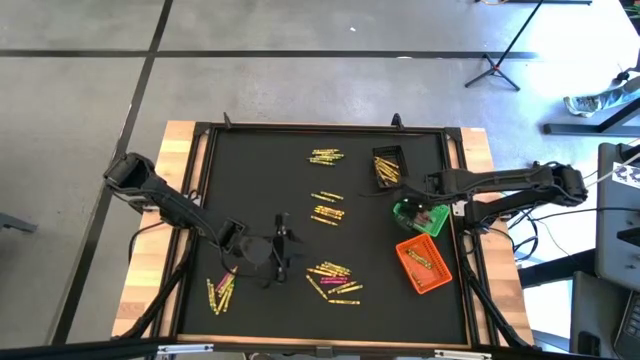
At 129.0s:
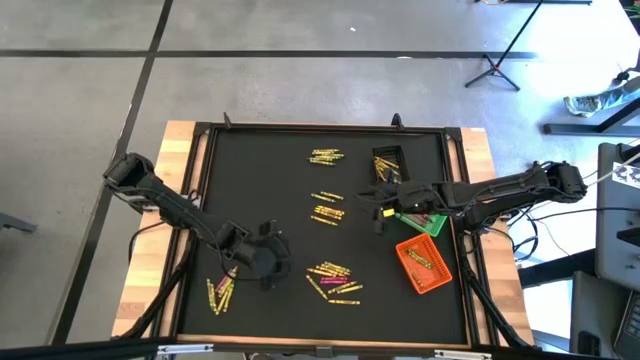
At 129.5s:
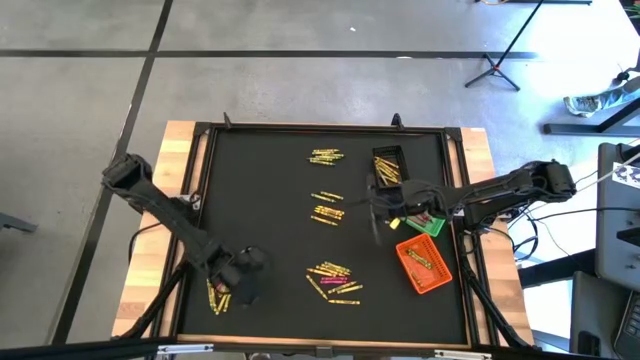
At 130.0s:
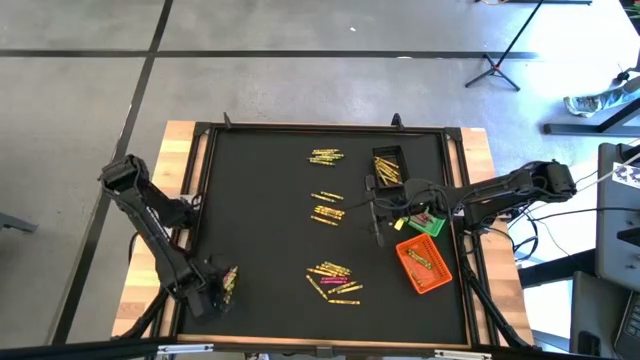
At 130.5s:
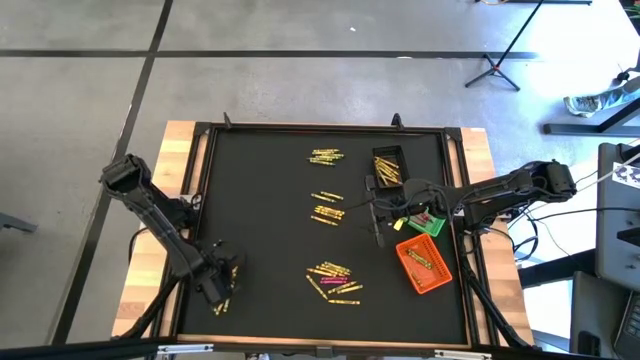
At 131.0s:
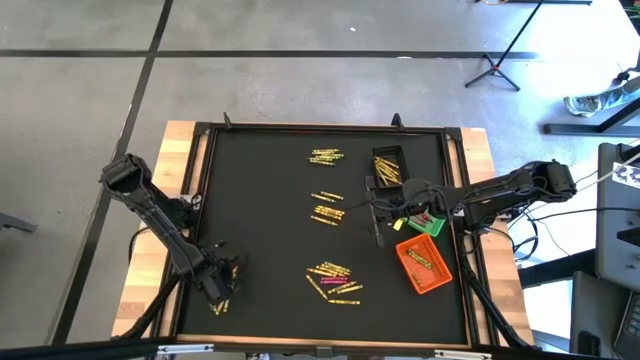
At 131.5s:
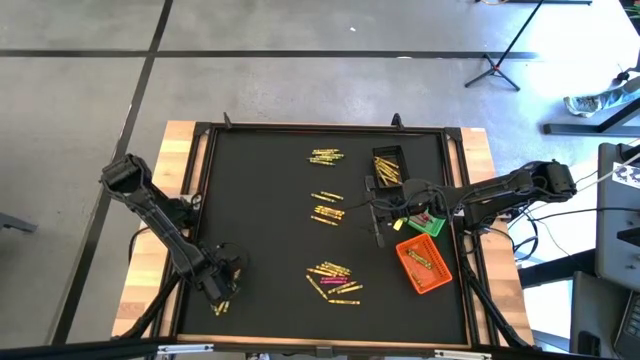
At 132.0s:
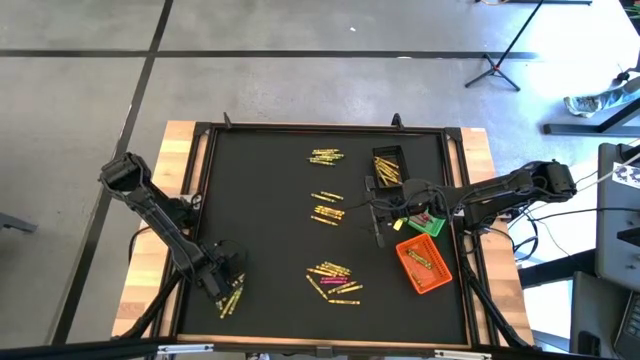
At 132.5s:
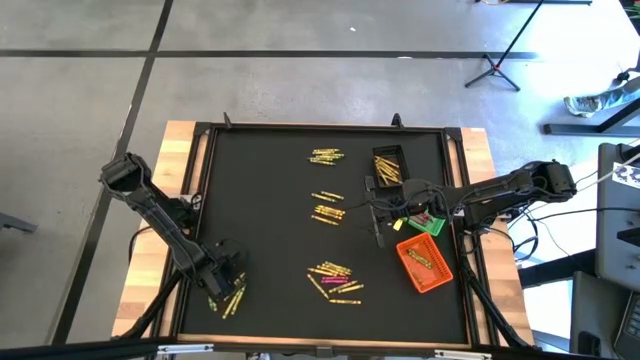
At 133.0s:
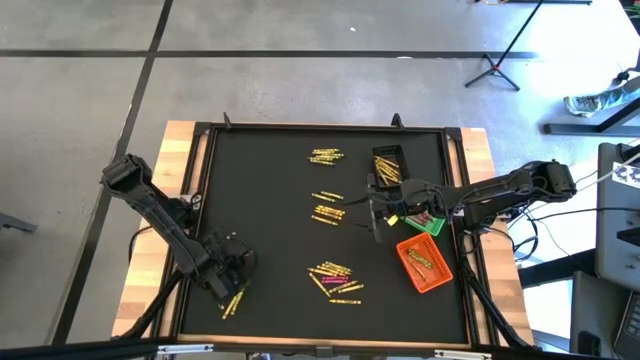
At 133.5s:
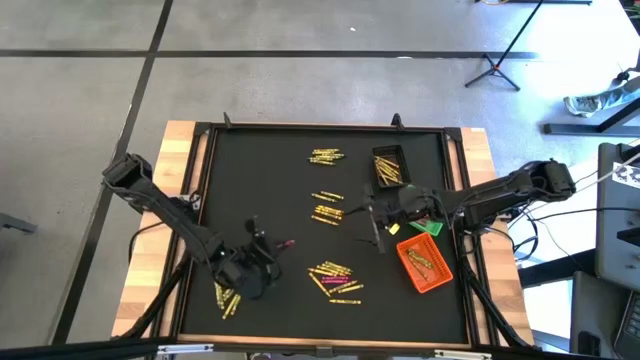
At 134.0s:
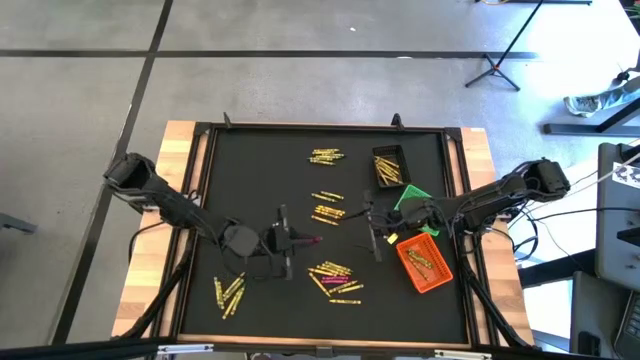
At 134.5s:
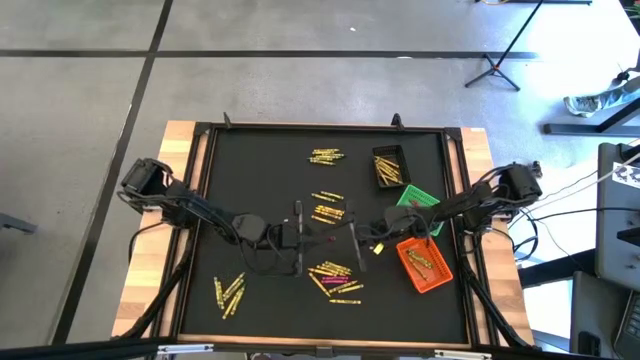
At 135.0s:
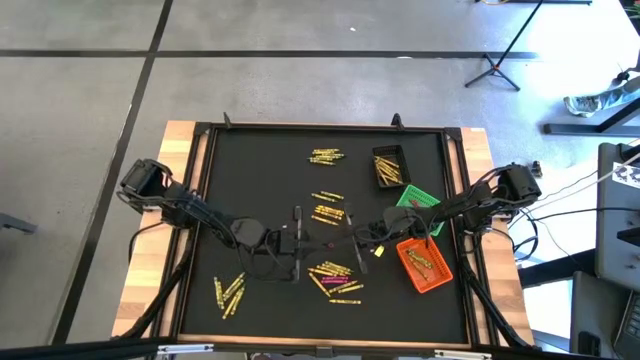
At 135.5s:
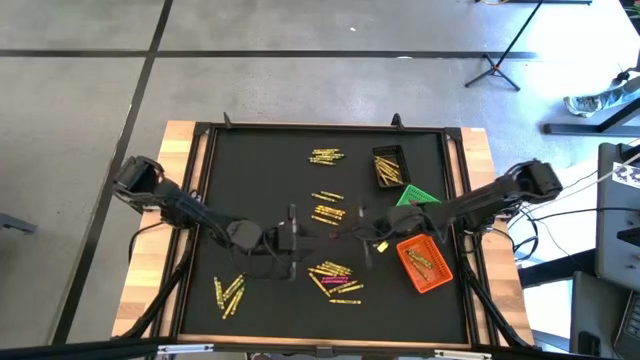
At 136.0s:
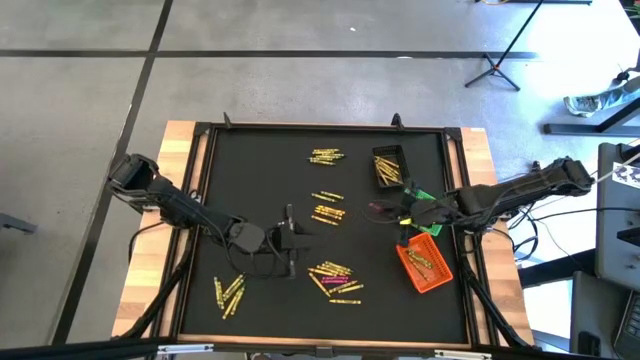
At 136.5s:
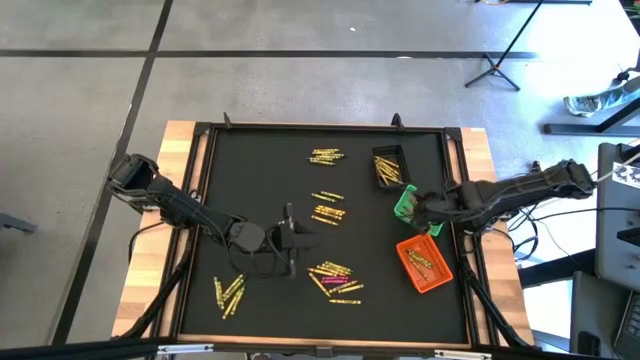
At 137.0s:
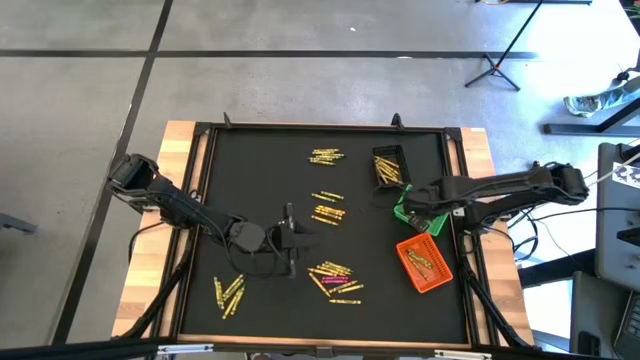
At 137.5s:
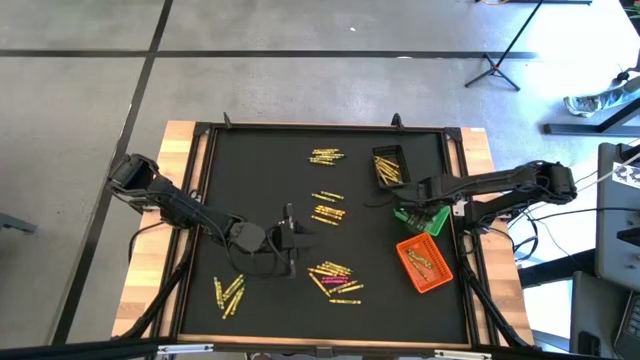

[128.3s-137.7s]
Task: Sort crayons
Put the red crayon into the green basket

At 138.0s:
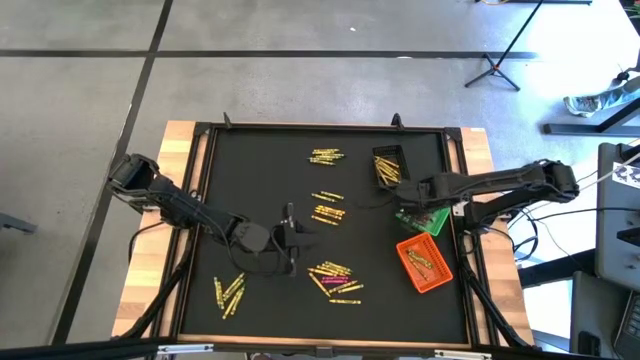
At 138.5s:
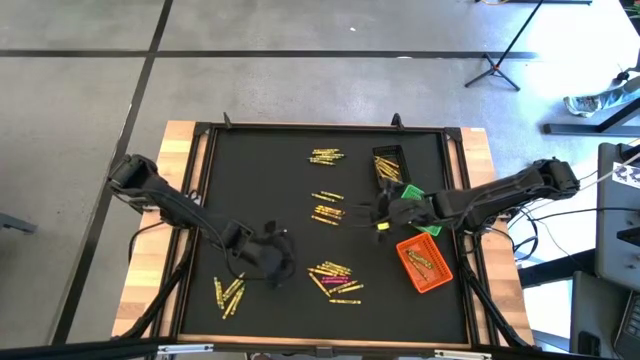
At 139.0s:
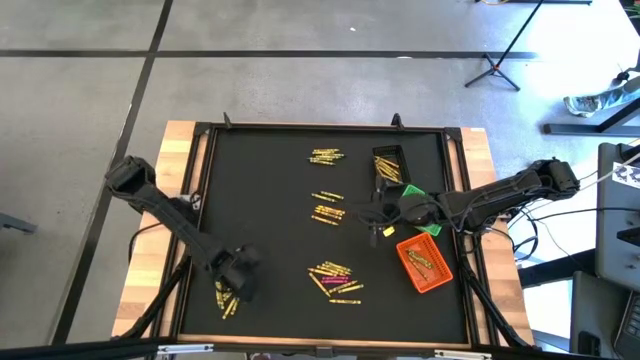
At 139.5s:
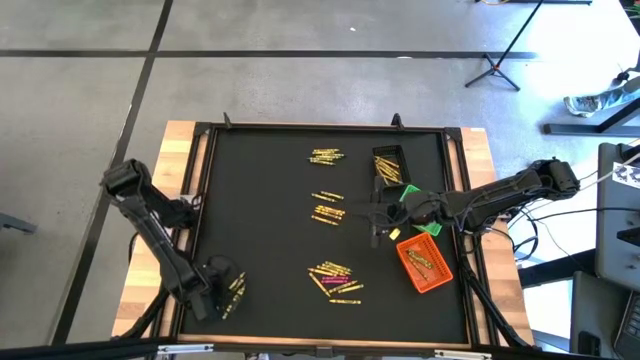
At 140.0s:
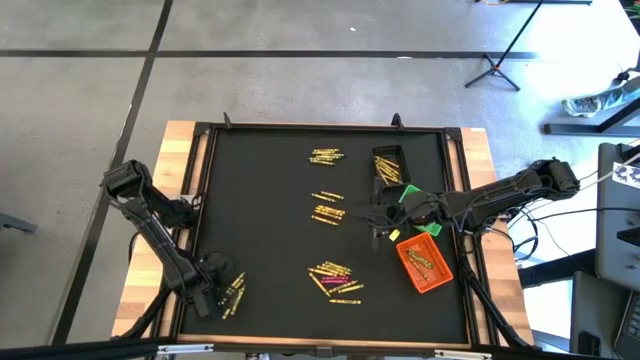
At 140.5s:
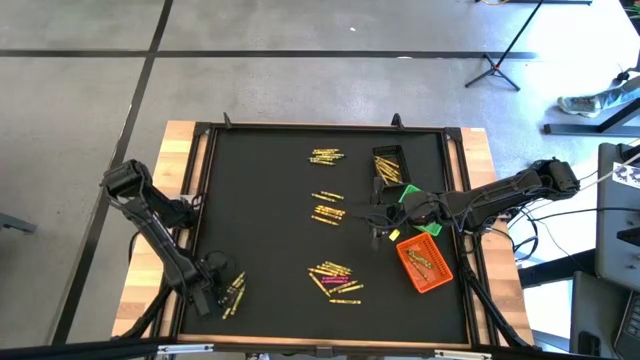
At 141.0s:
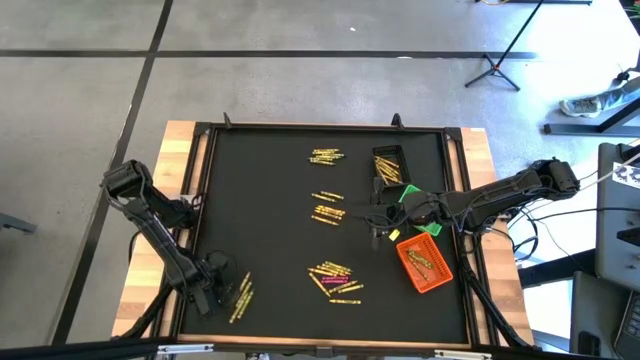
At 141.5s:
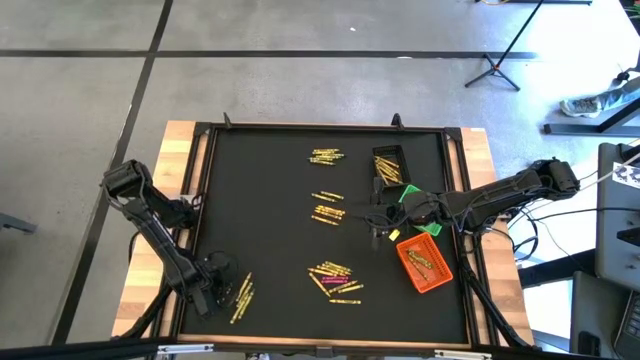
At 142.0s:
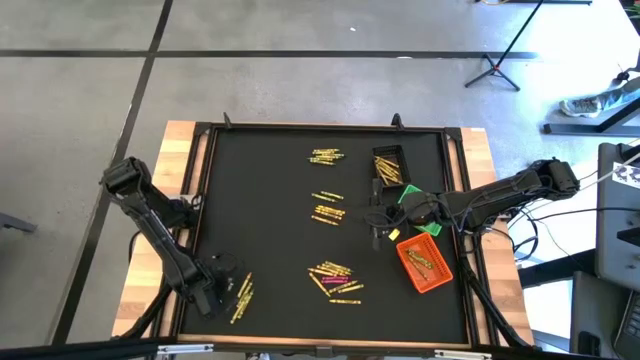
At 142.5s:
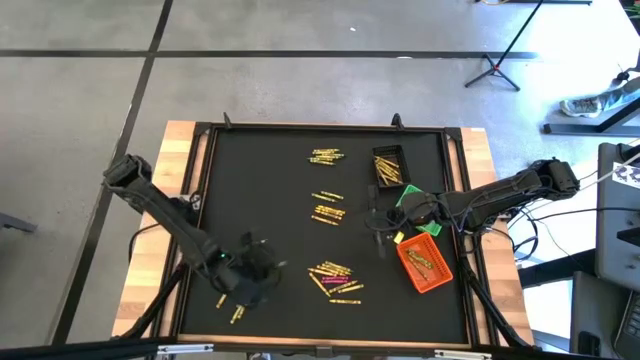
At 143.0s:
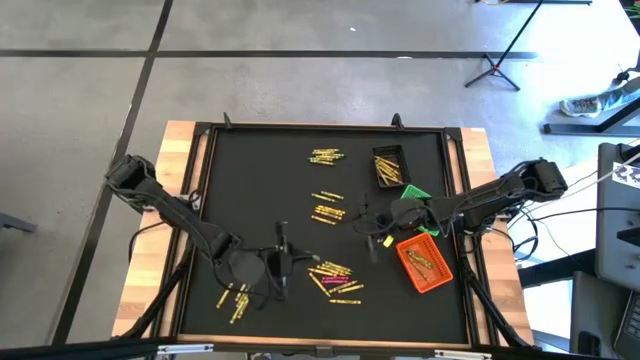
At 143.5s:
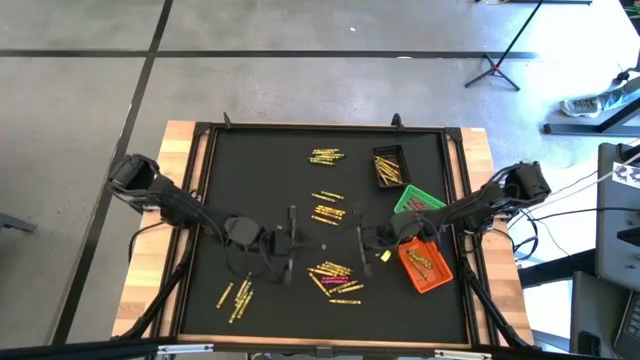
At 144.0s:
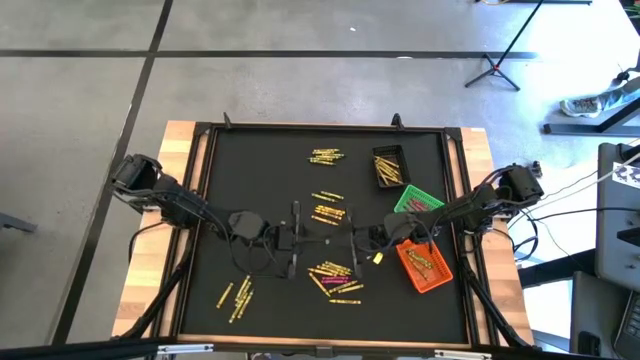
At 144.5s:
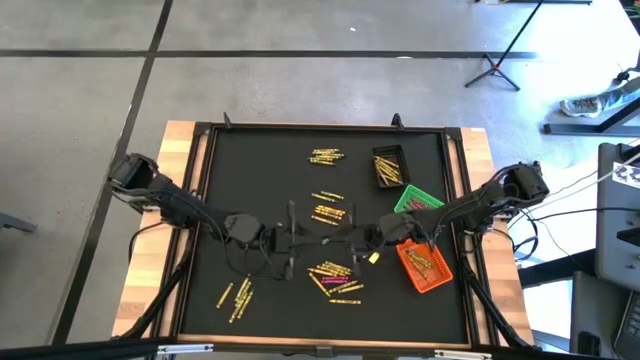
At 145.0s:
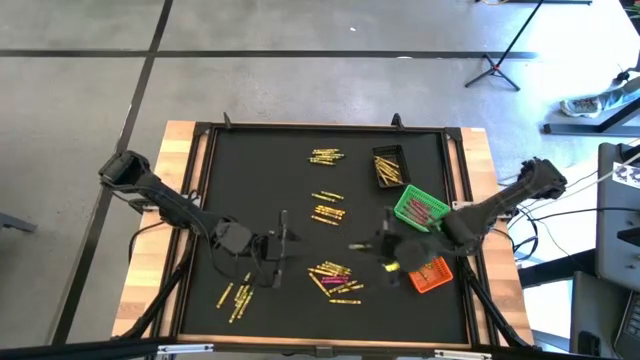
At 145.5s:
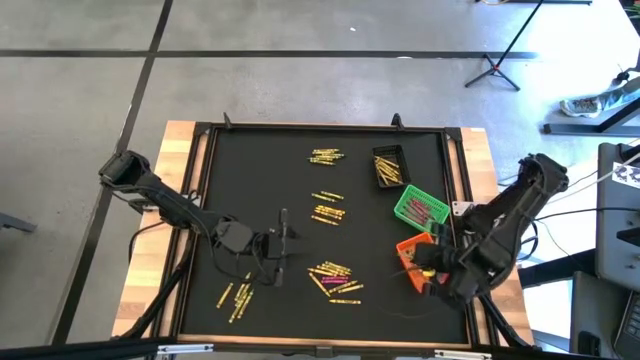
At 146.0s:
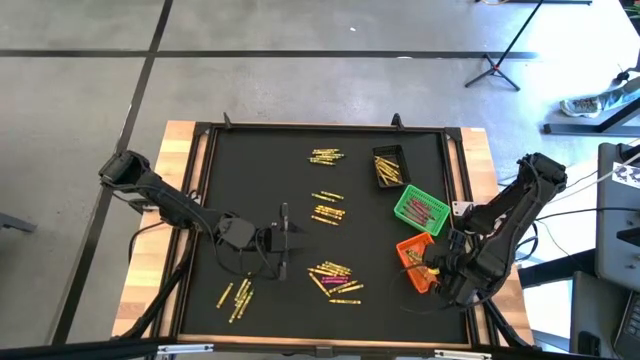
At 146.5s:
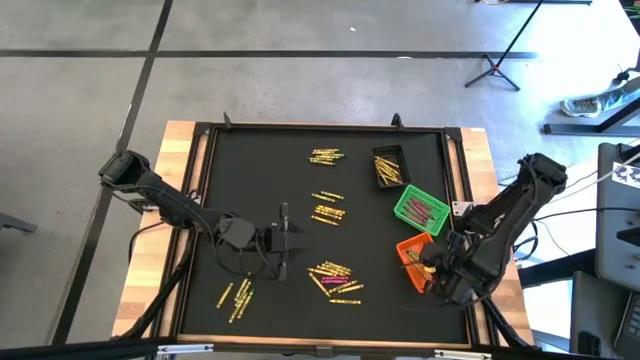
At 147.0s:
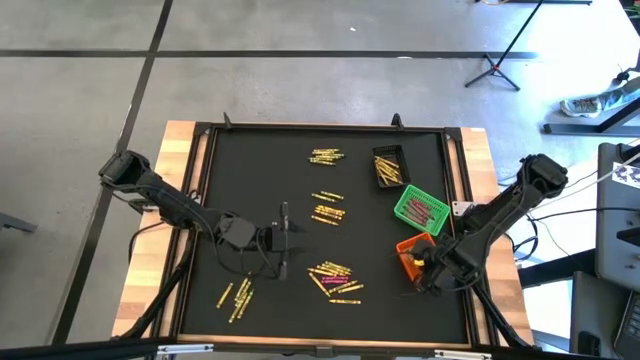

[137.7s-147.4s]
Put the green crayon into the orange basket

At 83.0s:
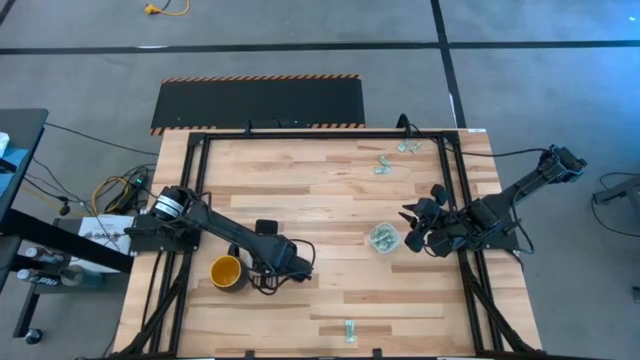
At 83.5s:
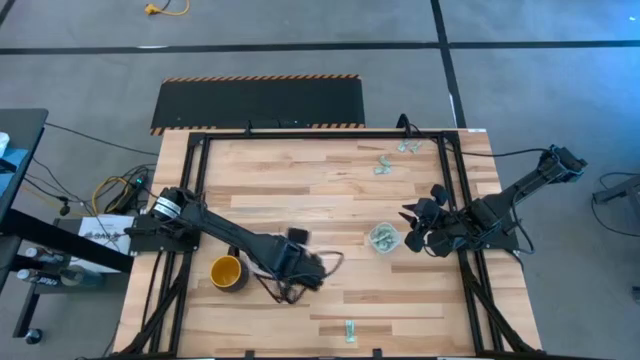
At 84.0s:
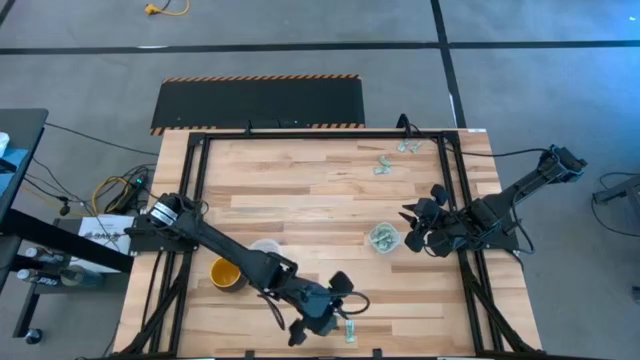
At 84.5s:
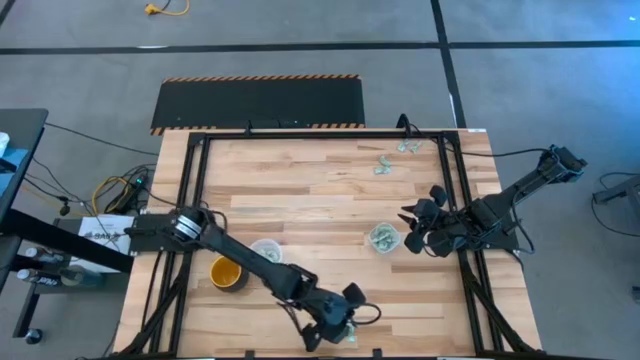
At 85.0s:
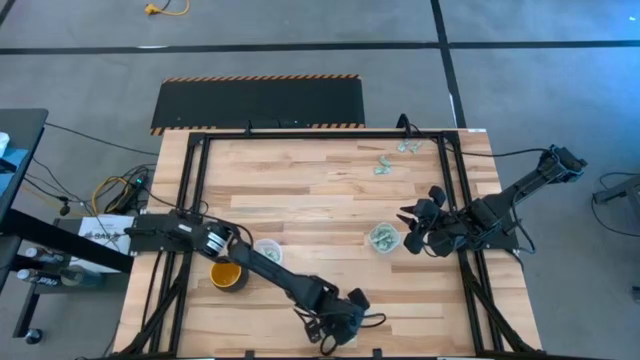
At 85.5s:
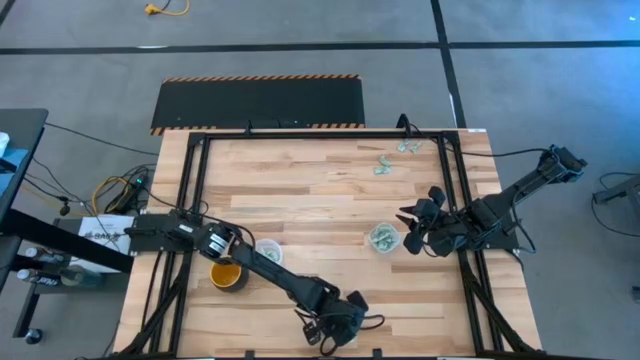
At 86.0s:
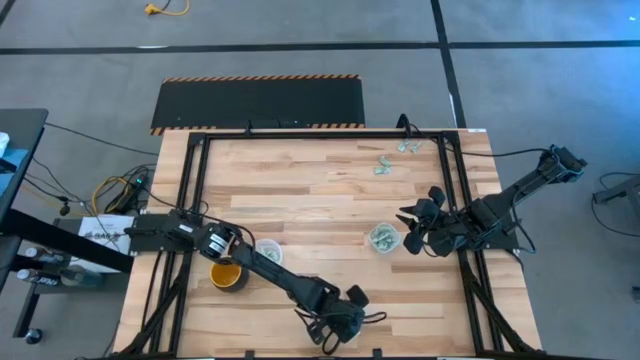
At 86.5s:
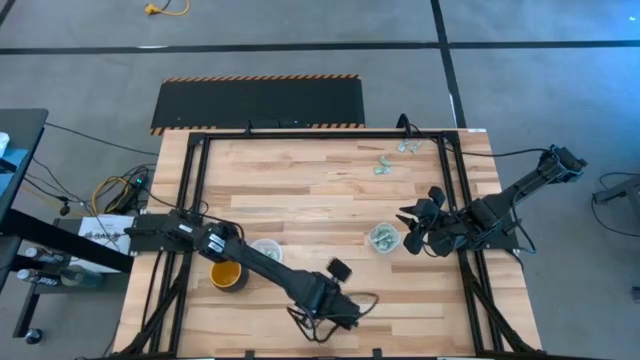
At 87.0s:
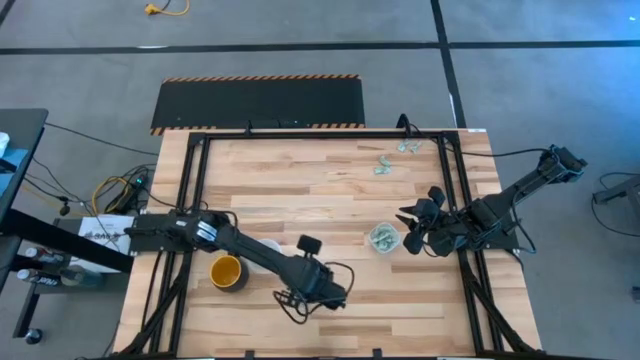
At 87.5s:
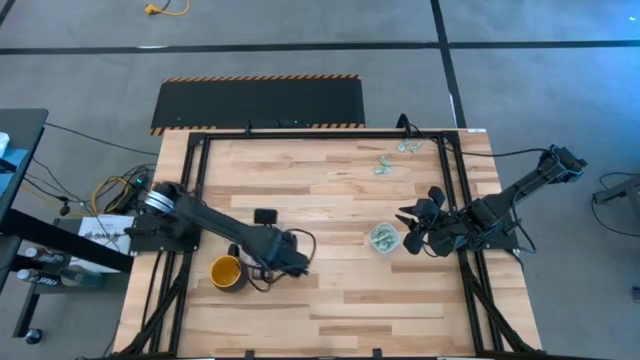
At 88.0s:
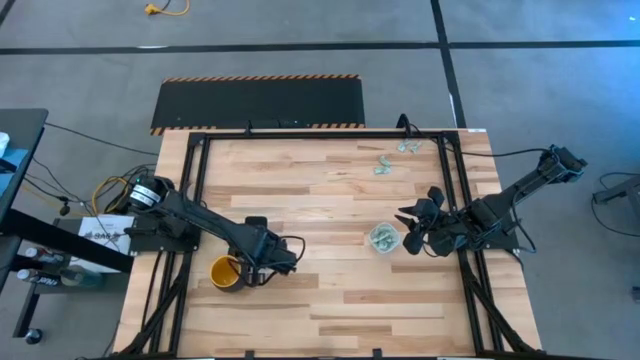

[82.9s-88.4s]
Task: Pick and place Stevia / Truvia into bins
Put the white stevia packet into the round transparent container
